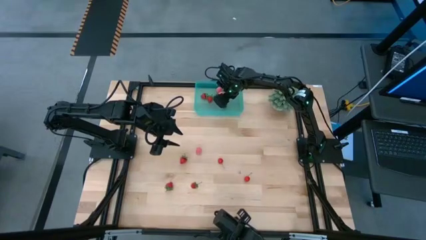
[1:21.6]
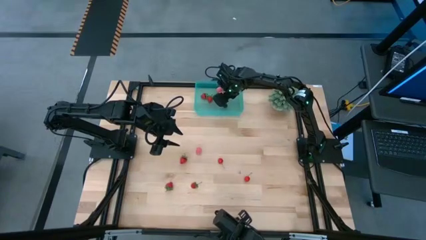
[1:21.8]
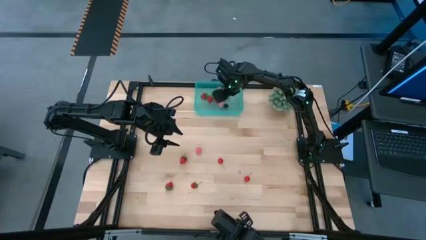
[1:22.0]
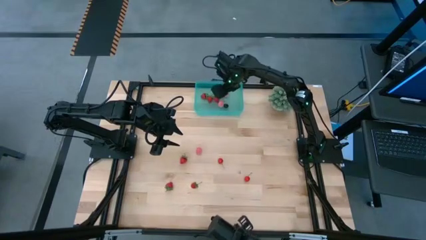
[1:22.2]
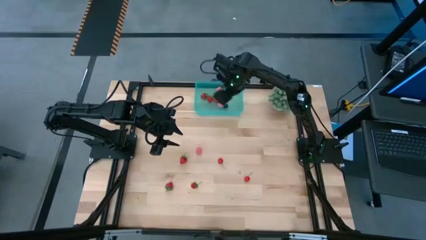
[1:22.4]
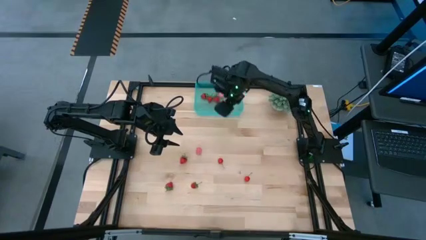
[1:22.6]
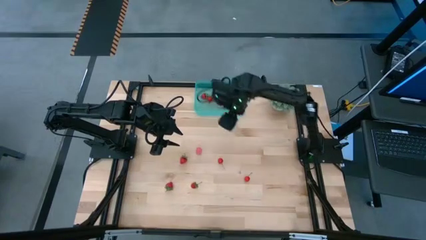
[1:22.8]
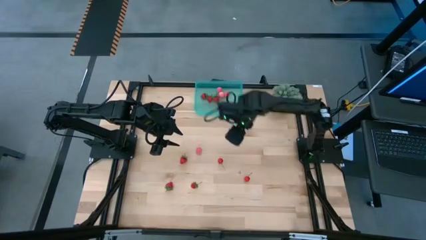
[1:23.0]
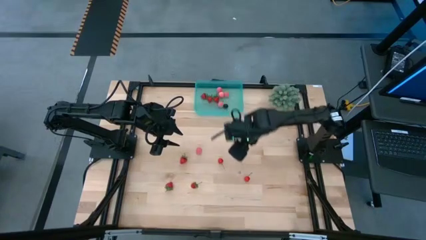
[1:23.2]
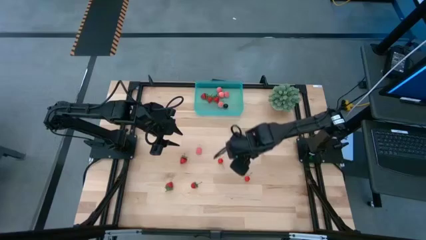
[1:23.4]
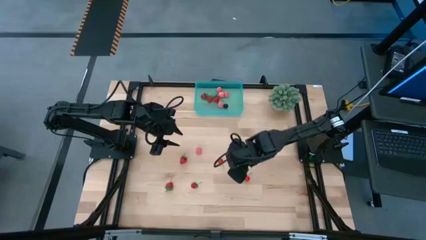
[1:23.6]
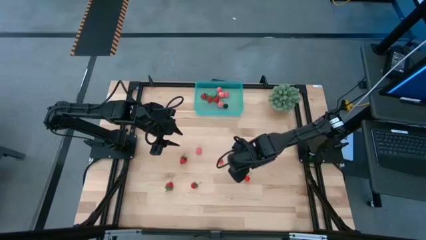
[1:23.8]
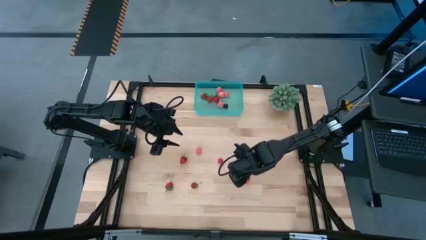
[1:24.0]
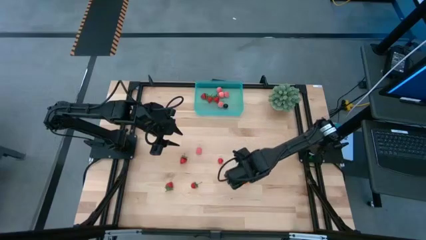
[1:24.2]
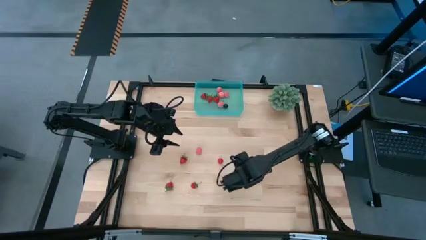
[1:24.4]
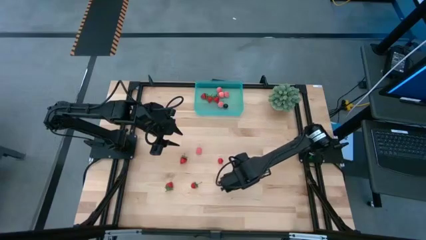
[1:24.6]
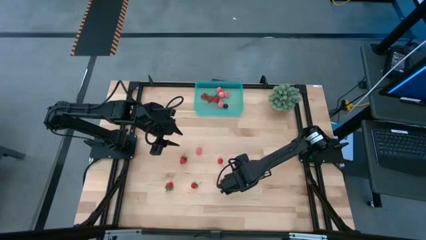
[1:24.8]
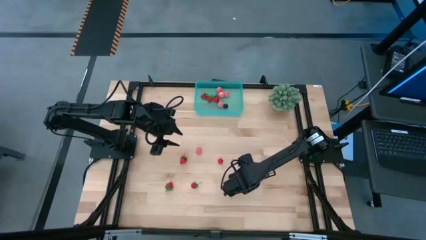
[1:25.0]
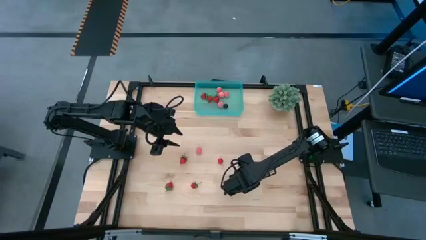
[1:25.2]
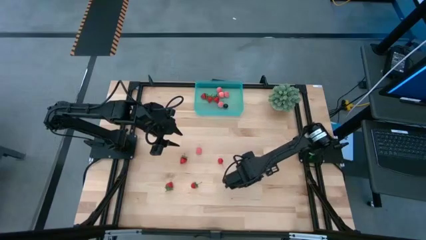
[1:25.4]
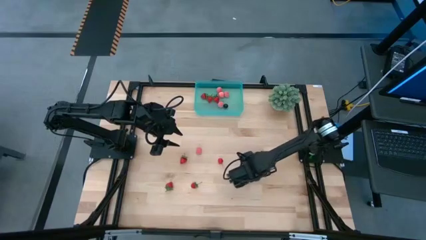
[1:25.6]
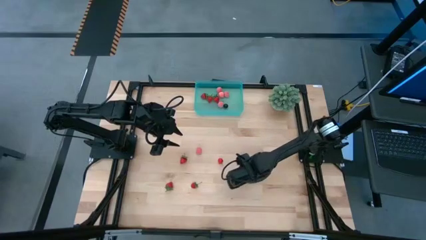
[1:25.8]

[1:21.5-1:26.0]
Task: Pick and placing Produce into tupperware
Put the red cherry into the blue basket

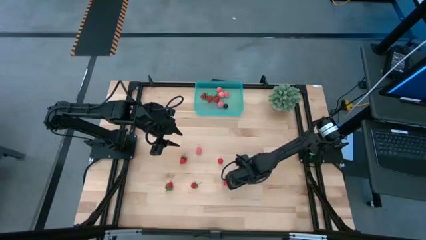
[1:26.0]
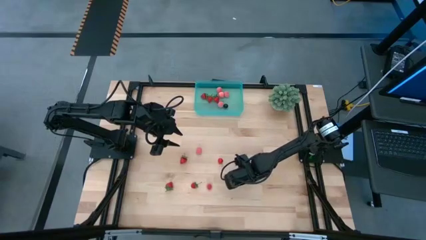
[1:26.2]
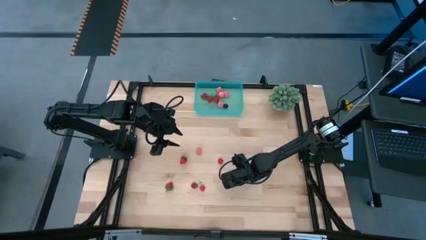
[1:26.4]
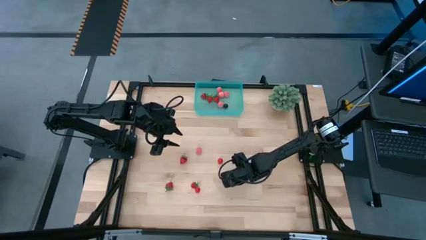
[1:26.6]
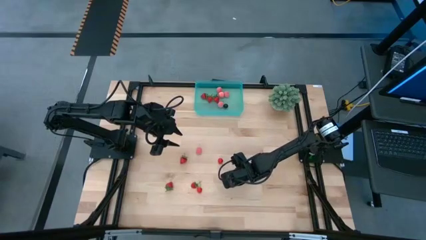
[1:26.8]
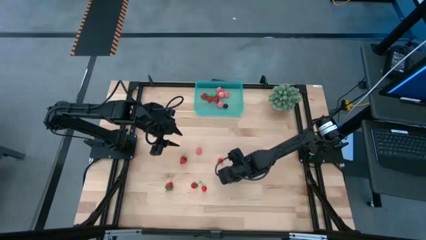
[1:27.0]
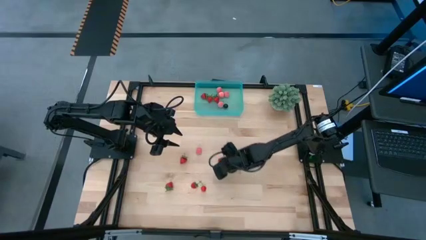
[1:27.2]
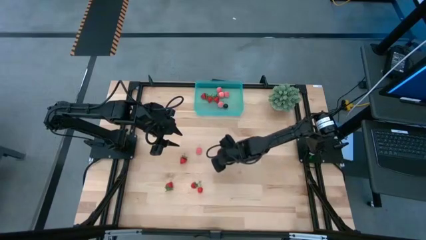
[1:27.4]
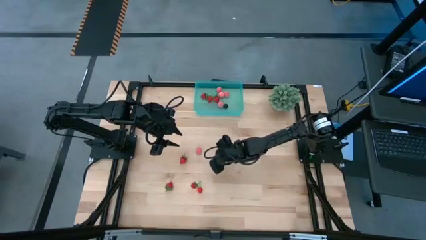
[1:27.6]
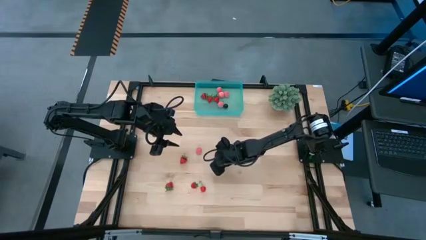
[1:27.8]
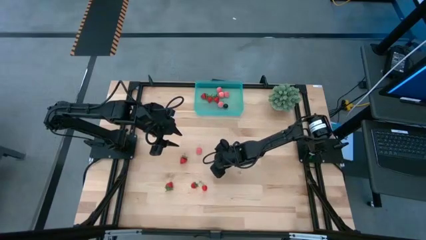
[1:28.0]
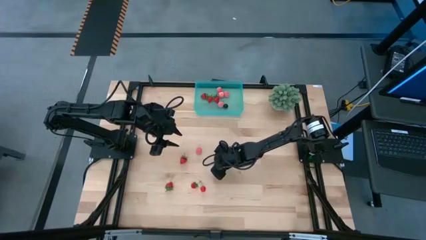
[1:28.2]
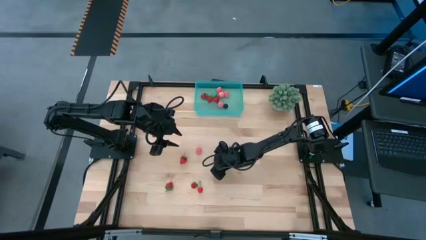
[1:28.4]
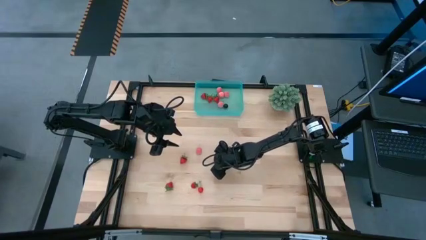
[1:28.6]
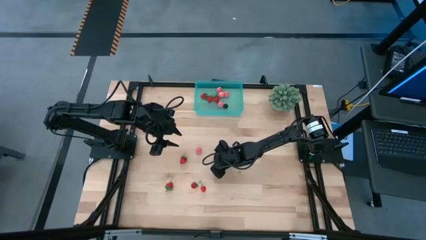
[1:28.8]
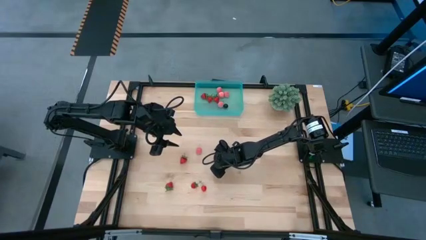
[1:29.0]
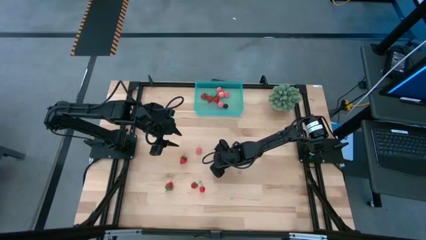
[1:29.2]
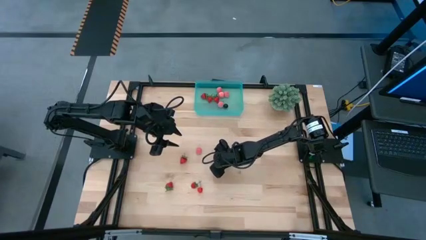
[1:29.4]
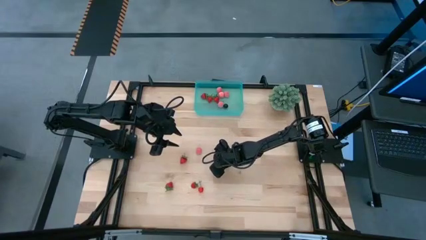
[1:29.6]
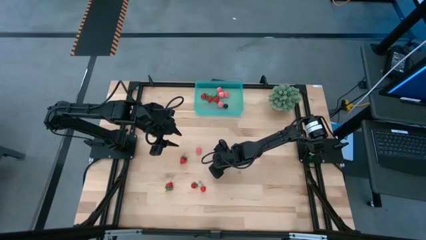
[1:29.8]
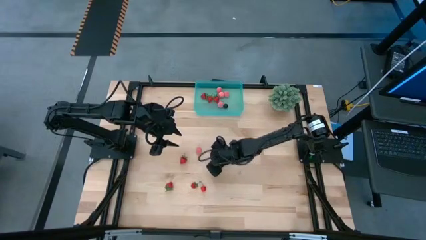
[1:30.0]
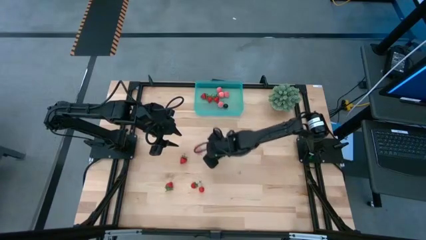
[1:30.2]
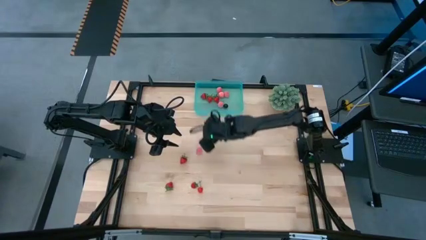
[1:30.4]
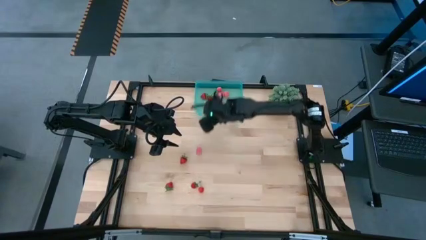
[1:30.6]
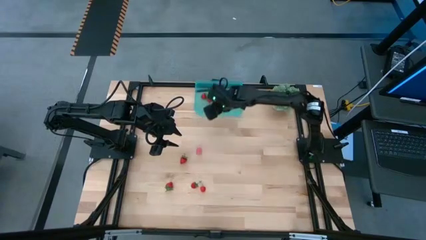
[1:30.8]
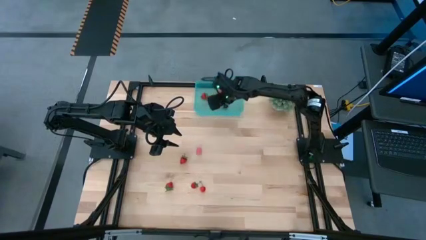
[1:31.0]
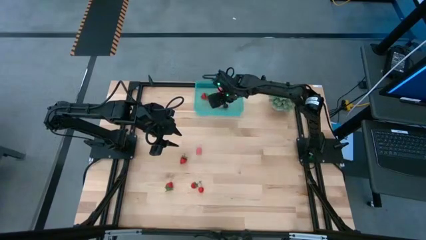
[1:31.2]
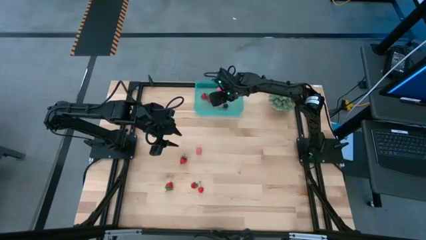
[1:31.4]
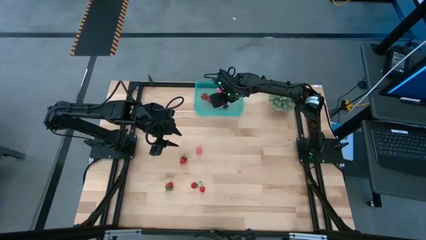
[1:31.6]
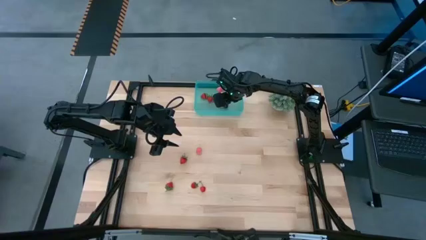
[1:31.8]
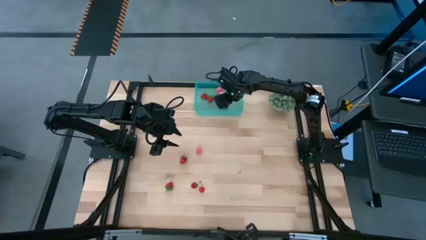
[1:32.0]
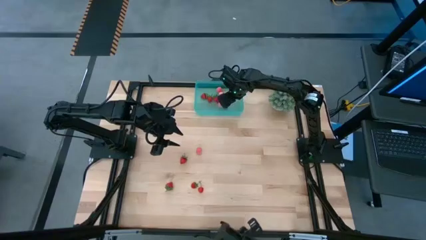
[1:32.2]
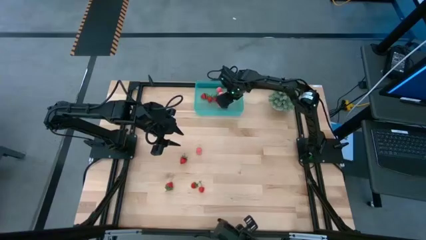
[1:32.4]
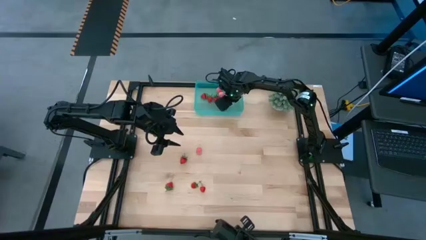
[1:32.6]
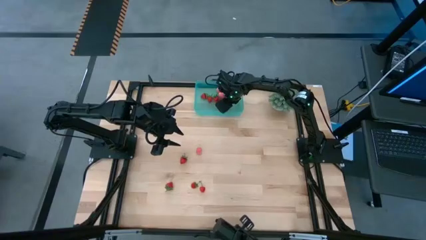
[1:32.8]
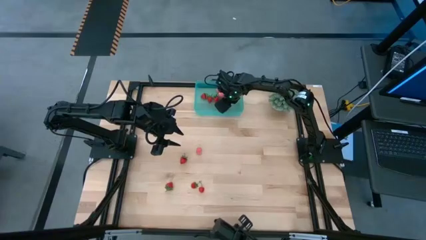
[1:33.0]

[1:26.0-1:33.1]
Put the red cherry into the blue basket
